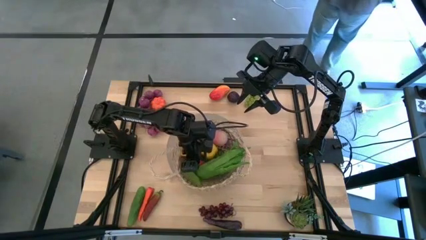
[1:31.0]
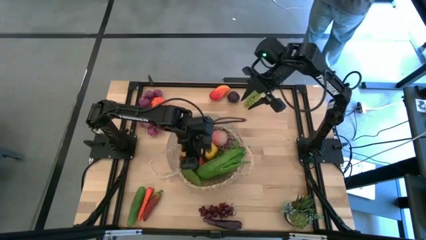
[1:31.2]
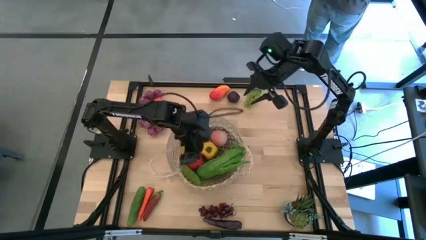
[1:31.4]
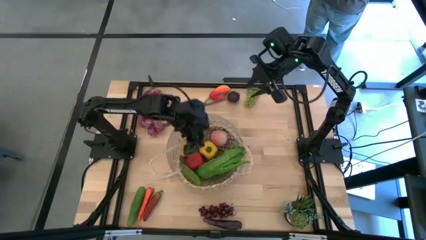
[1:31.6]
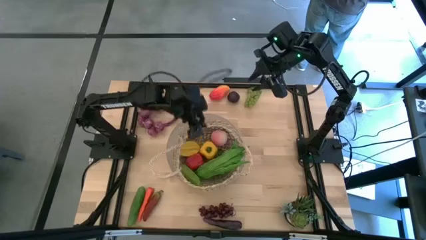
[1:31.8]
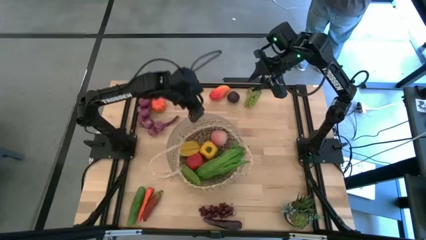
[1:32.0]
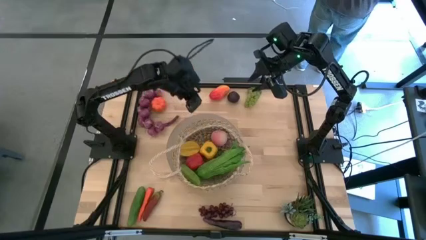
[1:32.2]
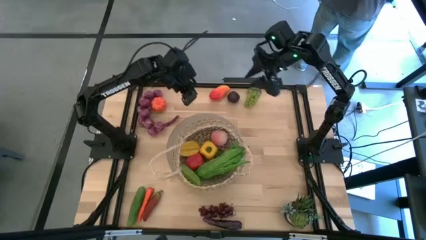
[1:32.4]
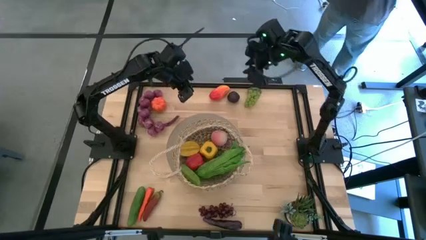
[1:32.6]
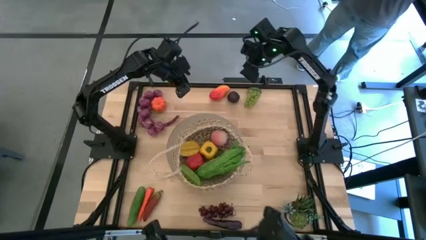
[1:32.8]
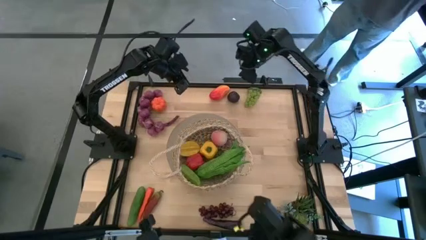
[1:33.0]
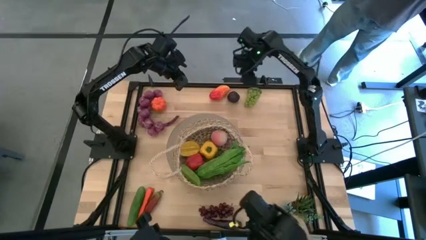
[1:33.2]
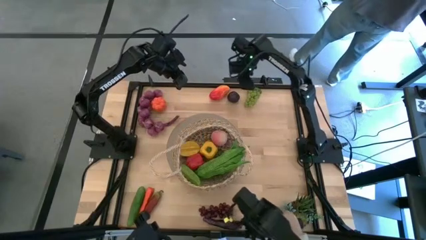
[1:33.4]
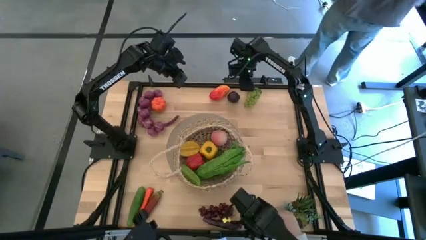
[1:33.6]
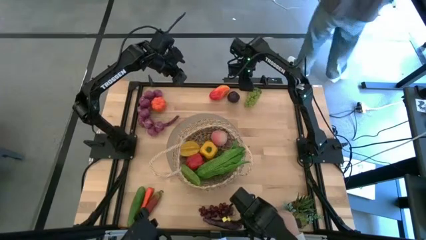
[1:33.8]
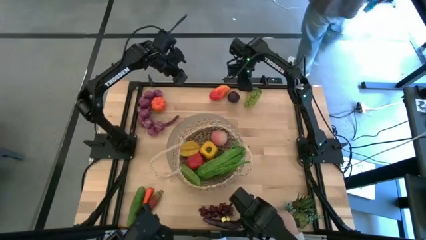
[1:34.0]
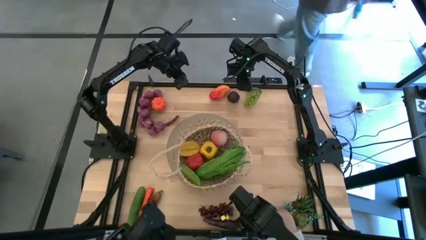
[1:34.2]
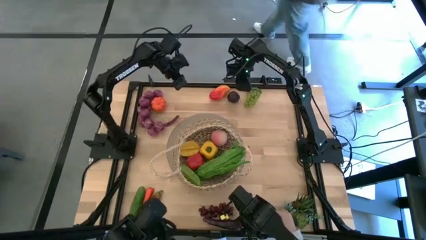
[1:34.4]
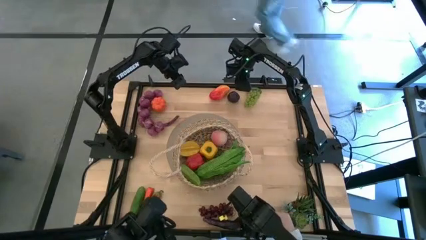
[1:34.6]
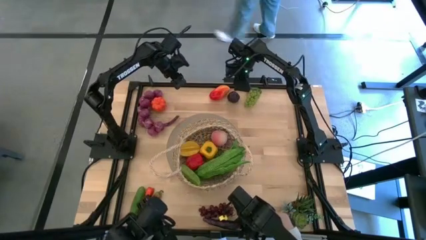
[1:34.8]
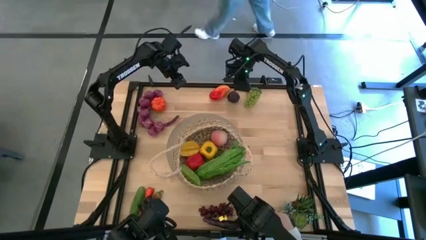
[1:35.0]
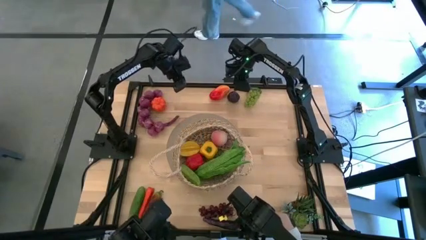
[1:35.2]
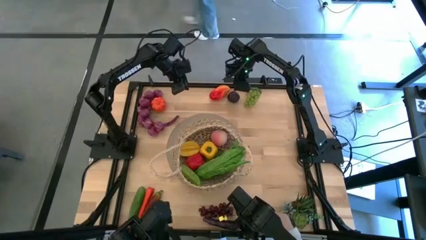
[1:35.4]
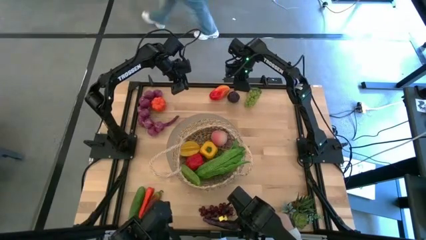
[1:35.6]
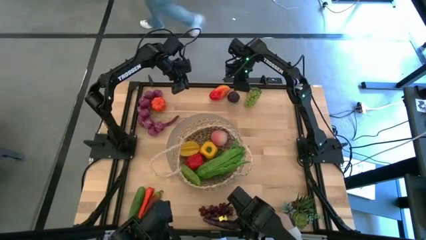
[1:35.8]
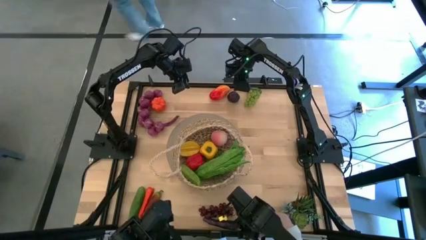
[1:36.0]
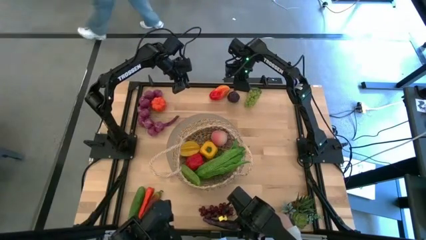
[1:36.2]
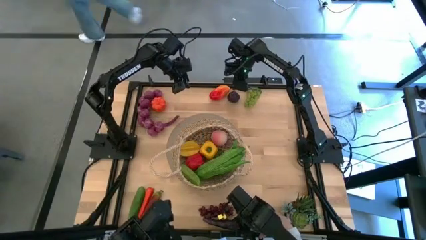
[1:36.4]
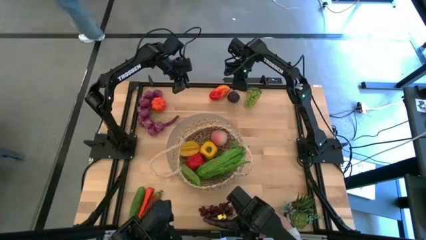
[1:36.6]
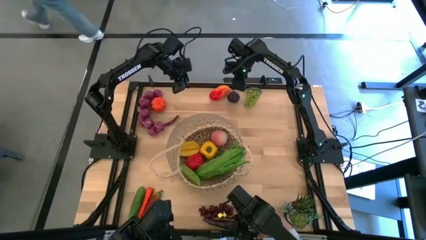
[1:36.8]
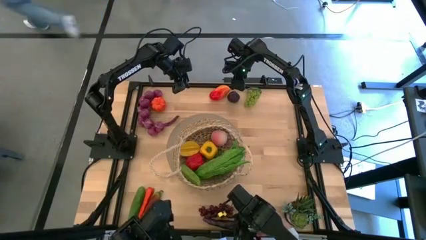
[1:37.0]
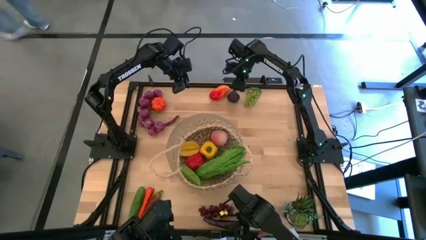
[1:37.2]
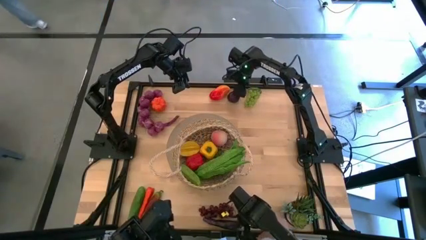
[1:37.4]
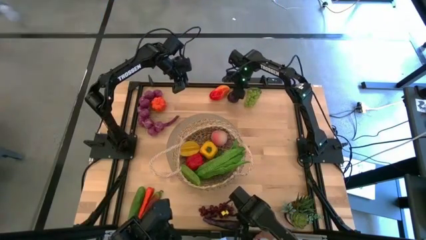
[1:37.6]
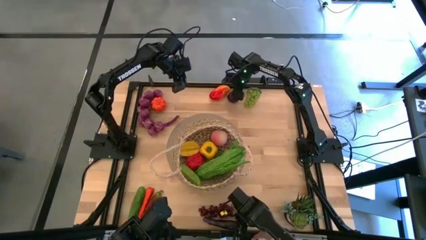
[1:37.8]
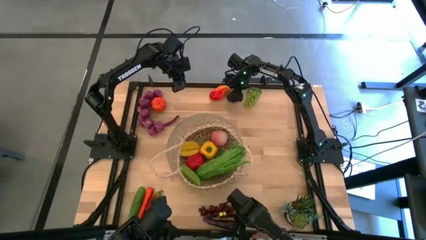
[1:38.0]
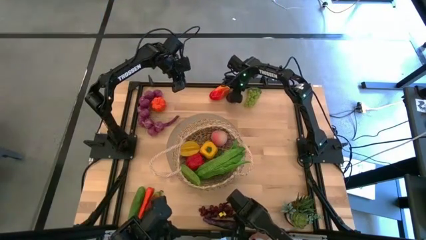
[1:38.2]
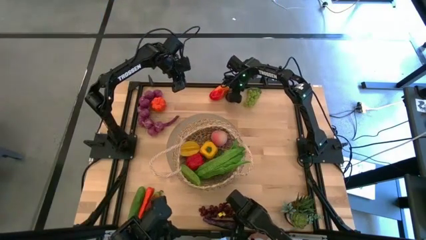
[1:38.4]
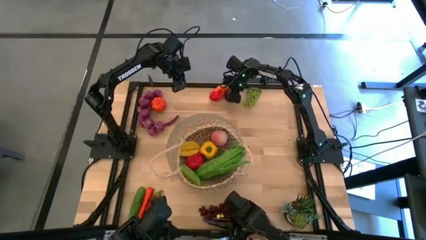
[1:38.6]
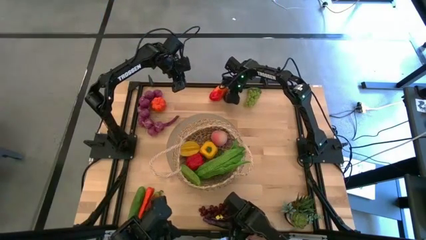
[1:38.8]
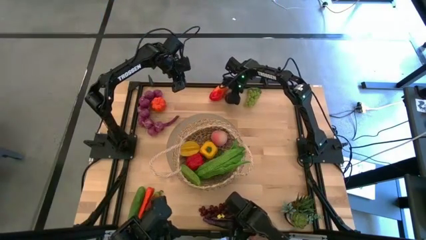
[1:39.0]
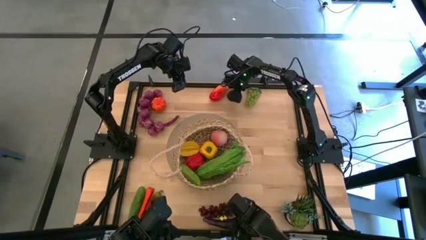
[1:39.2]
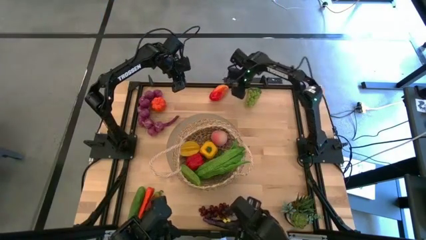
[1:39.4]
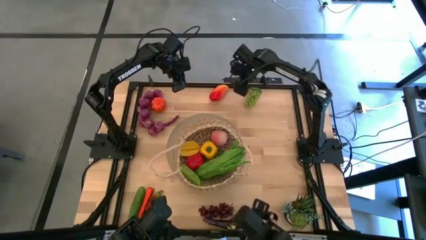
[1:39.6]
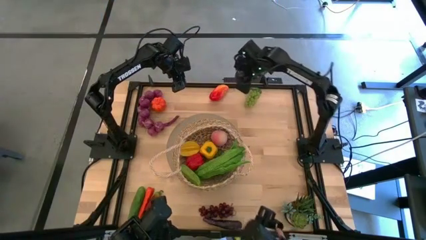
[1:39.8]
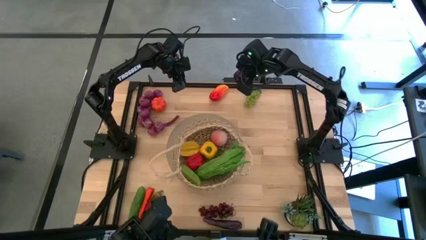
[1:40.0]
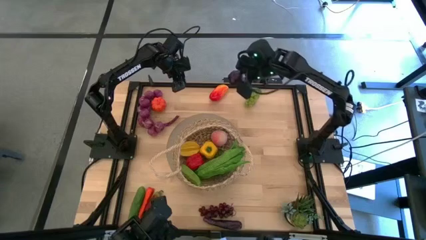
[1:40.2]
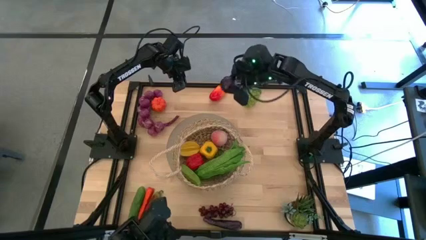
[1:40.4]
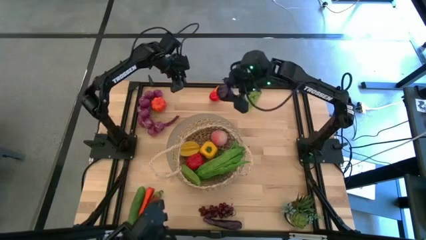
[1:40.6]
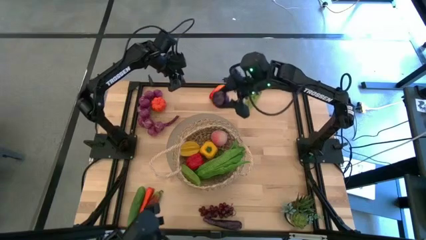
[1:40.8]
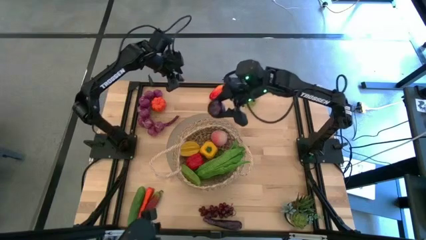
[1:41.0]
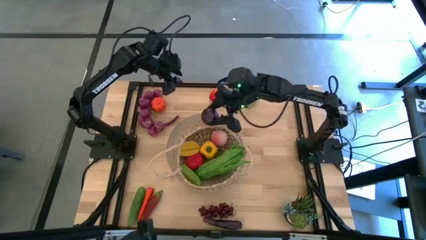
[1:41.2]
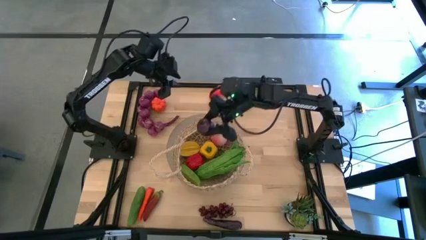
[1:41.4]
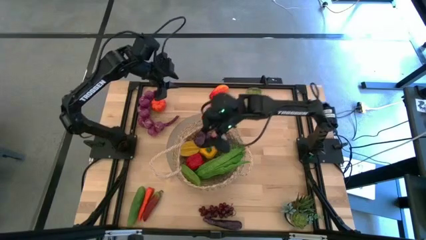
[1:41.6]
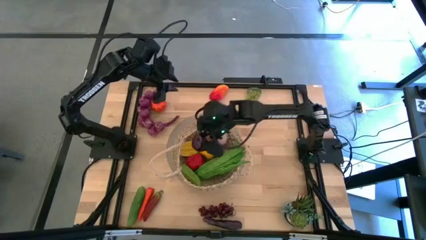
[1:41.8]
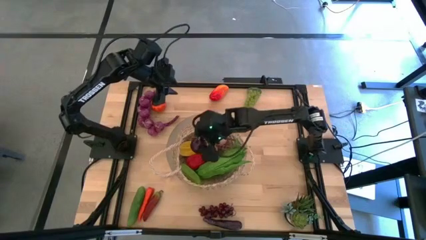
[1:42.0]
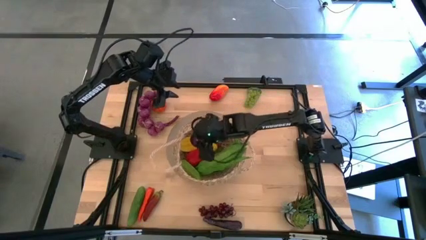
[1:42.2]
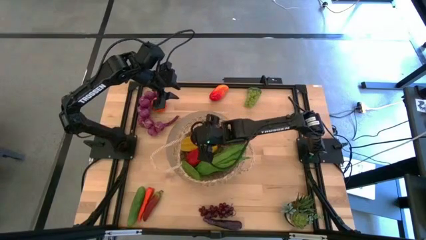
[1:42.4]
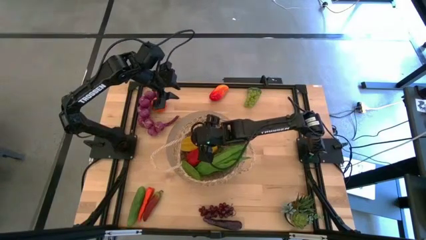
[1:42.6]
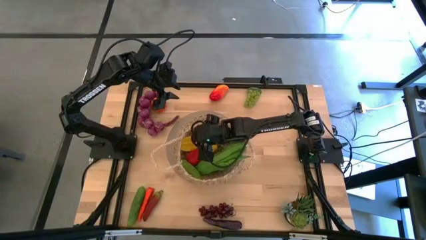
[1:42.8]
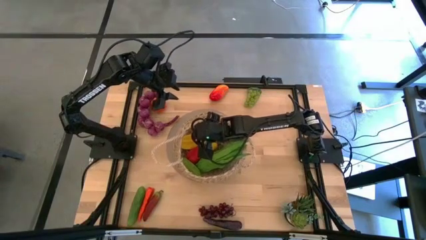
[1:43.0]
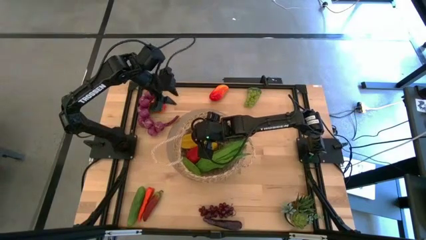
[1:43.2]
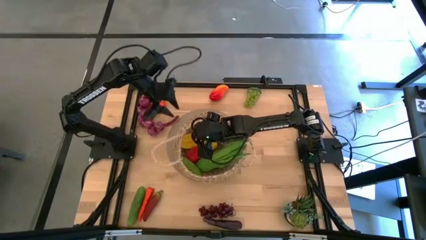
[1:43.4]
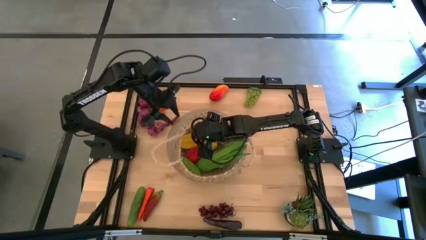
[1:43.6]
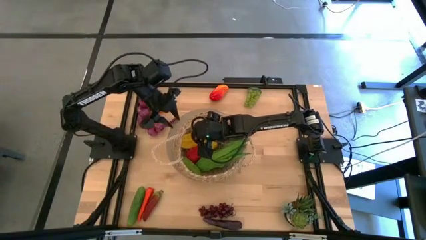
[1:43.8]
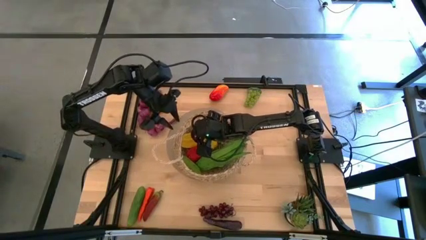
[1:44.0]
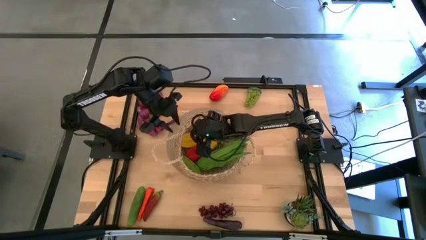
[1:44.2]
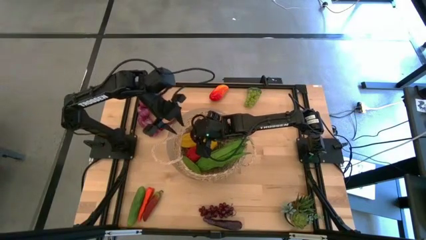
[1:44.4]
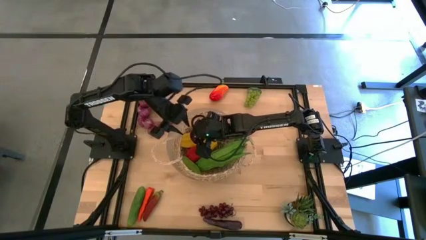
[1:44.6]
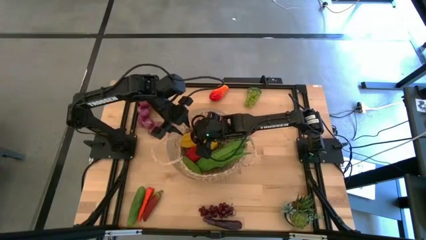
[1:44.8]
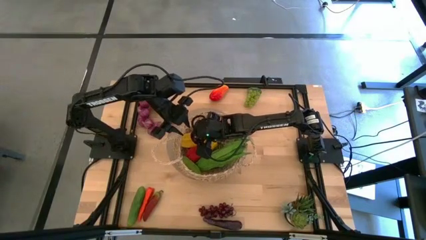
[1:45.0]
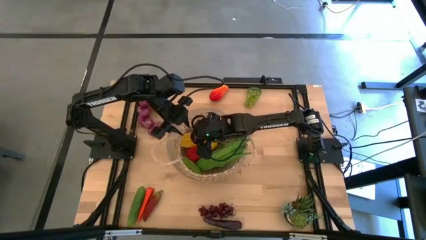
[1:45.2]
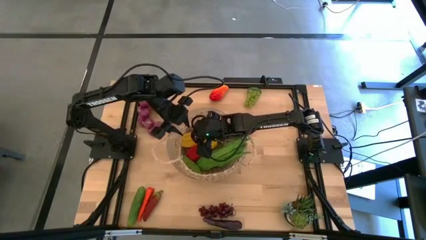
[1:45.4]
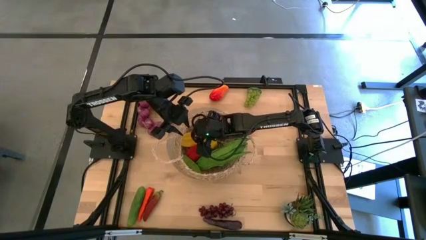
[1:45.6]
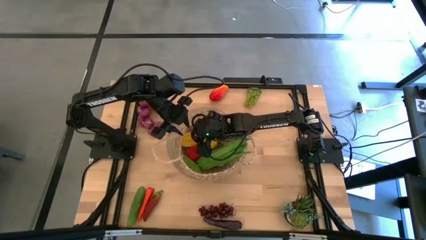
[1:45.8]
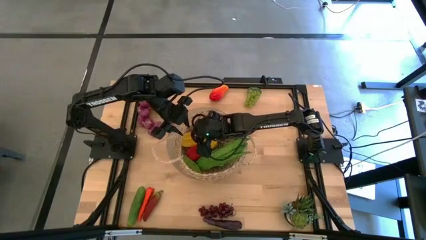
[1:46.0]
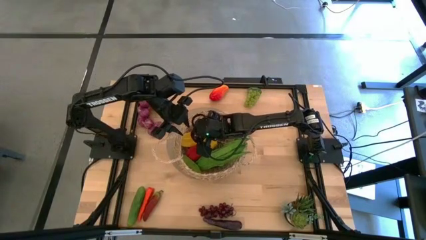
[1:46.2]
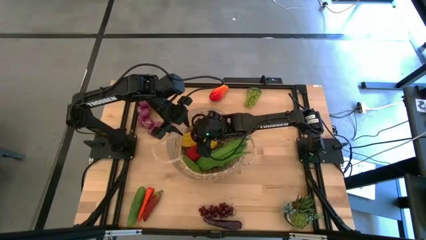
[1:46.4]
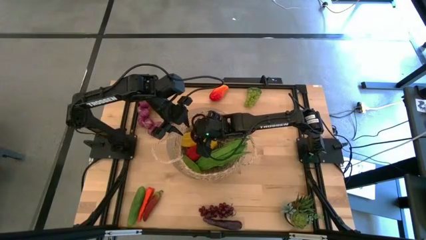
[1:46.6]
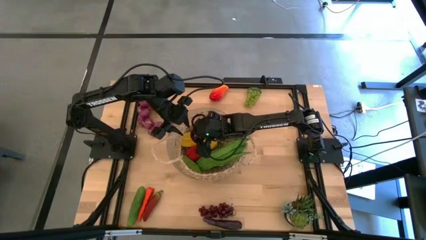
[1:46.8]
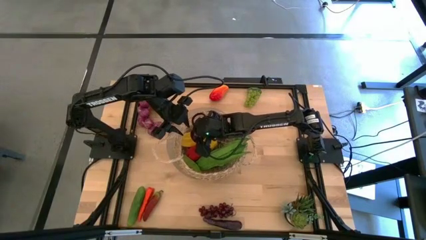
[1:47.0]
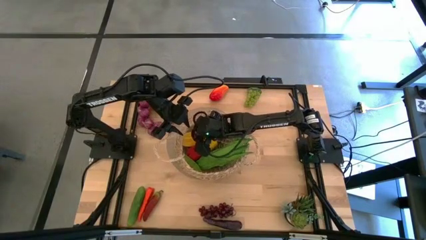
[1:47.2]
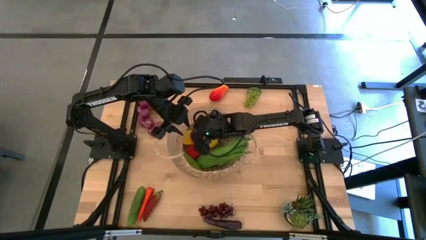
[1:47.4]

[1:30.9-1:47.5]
Task: Build produce basket
Put the purple plum into the brown basket
